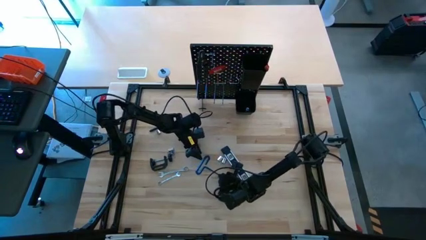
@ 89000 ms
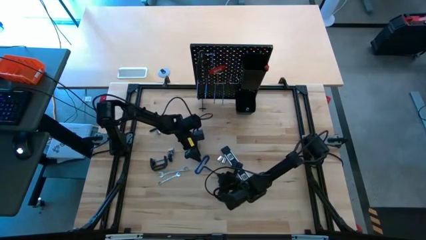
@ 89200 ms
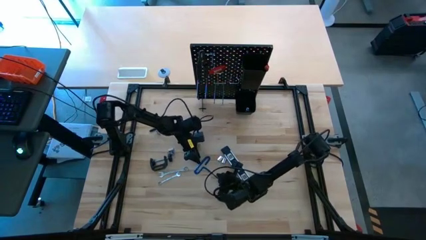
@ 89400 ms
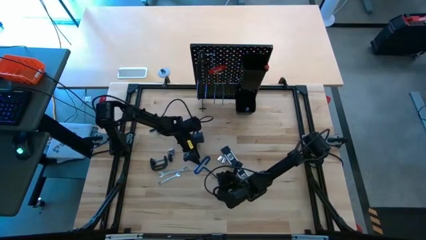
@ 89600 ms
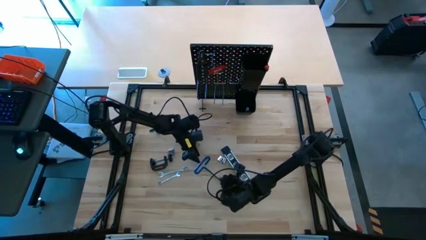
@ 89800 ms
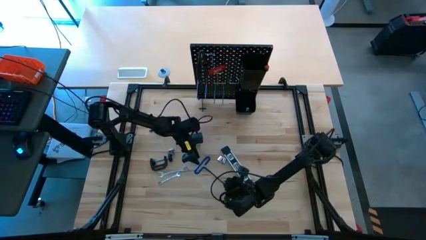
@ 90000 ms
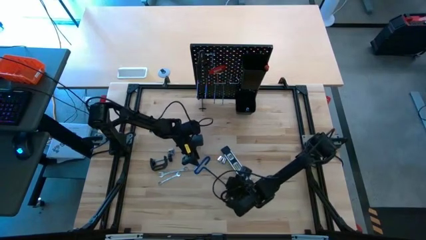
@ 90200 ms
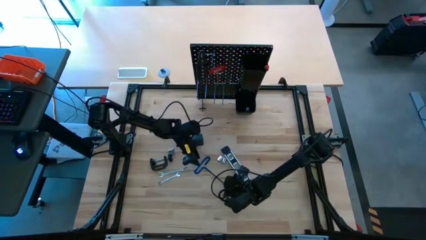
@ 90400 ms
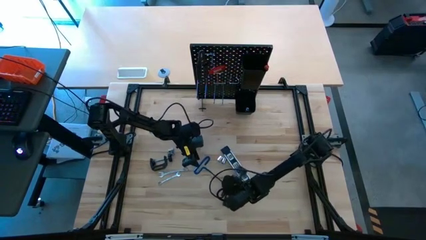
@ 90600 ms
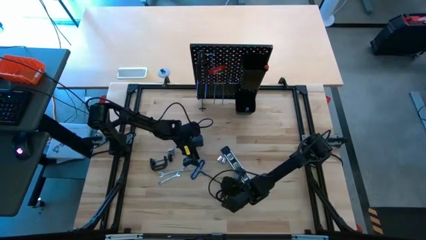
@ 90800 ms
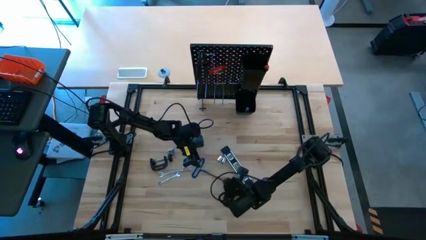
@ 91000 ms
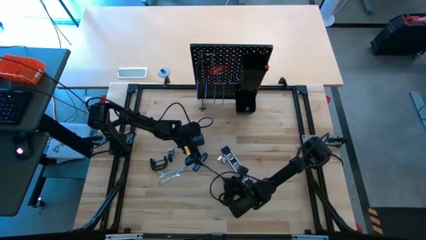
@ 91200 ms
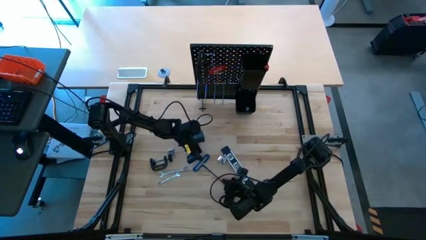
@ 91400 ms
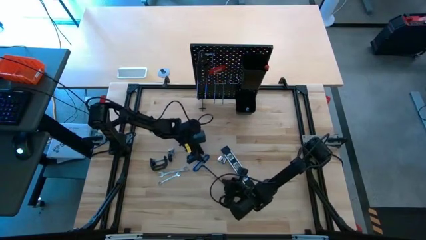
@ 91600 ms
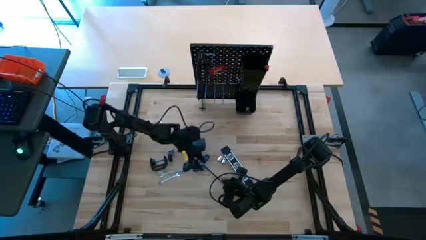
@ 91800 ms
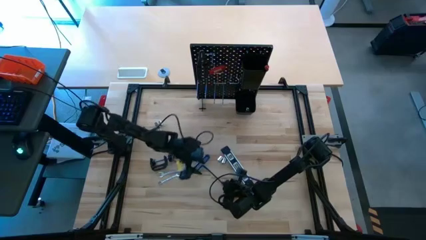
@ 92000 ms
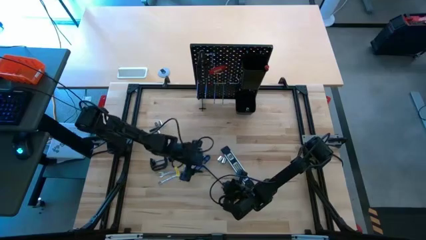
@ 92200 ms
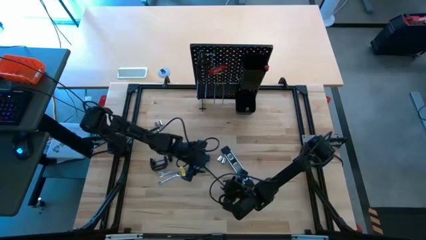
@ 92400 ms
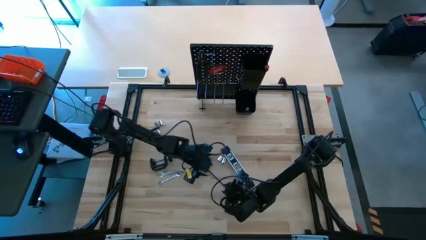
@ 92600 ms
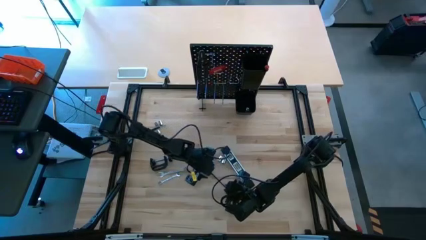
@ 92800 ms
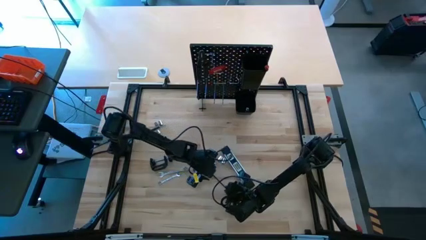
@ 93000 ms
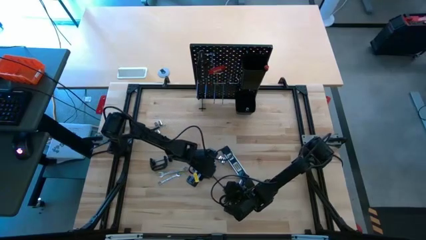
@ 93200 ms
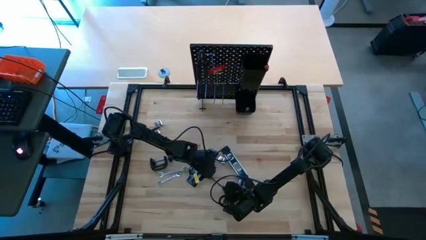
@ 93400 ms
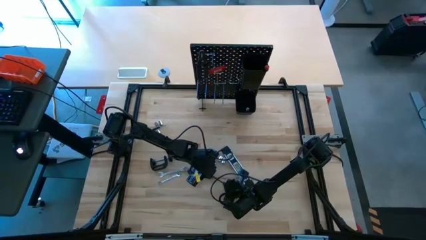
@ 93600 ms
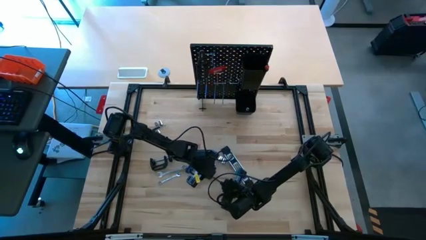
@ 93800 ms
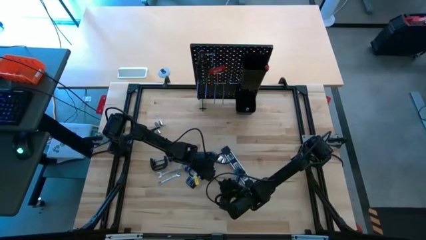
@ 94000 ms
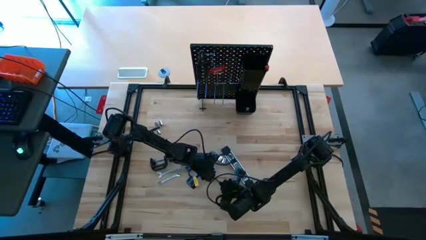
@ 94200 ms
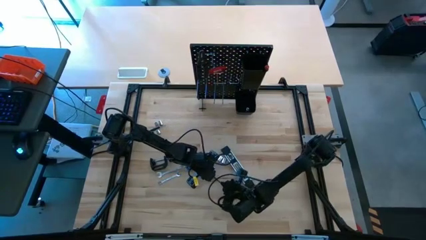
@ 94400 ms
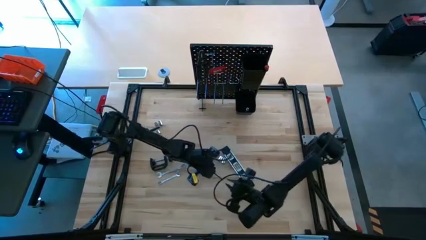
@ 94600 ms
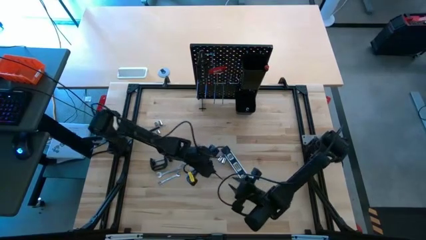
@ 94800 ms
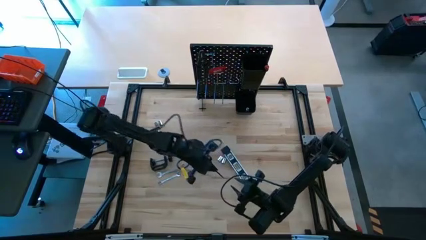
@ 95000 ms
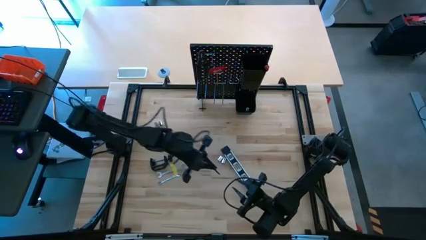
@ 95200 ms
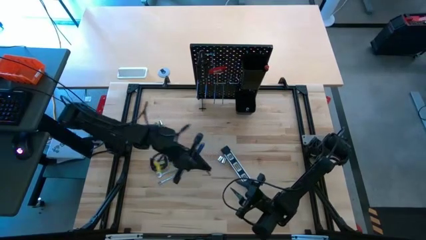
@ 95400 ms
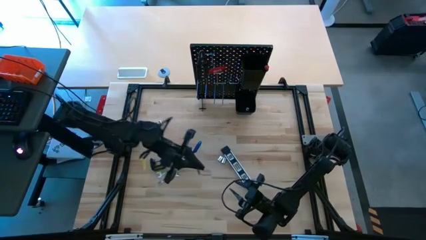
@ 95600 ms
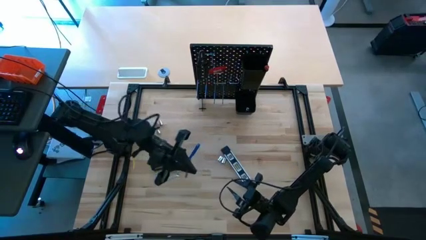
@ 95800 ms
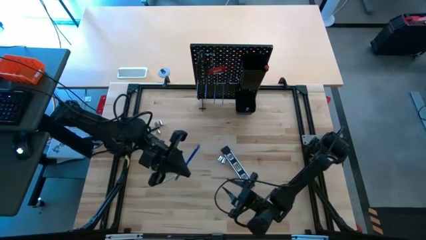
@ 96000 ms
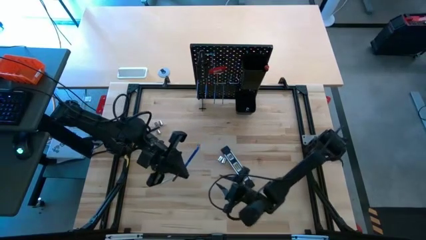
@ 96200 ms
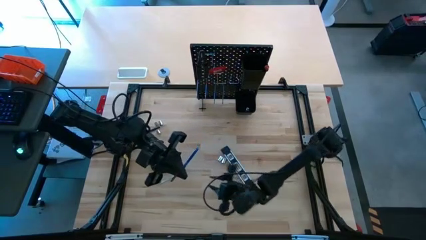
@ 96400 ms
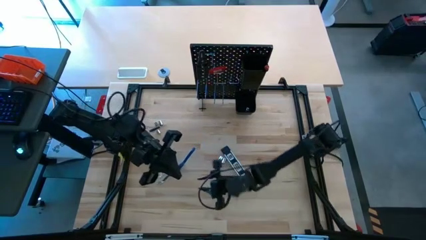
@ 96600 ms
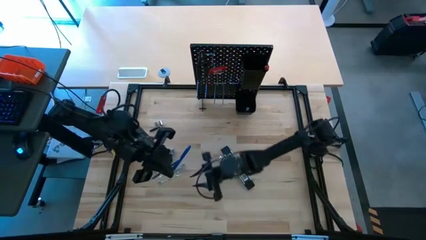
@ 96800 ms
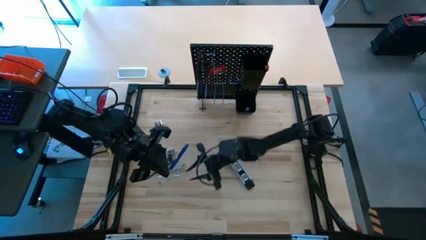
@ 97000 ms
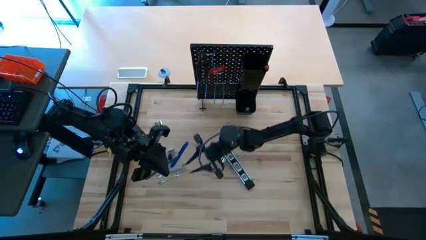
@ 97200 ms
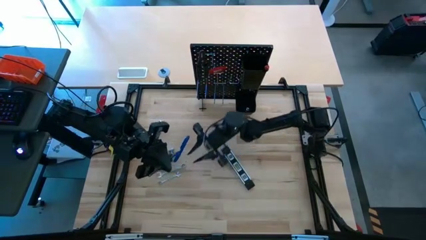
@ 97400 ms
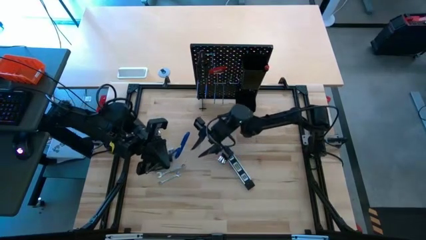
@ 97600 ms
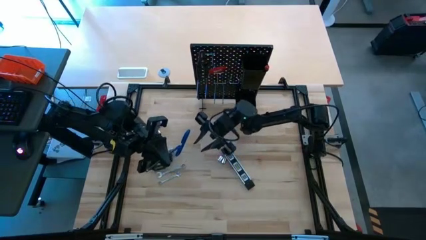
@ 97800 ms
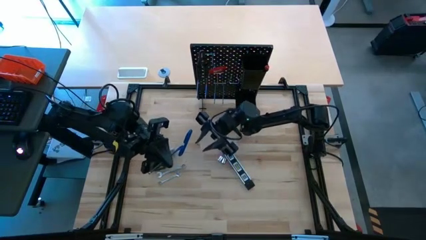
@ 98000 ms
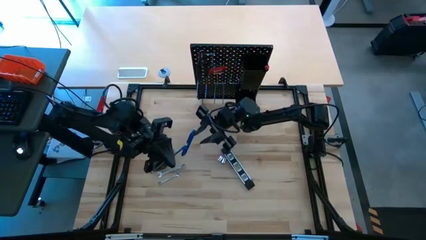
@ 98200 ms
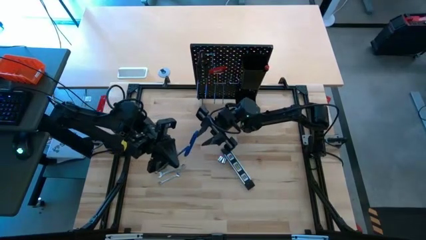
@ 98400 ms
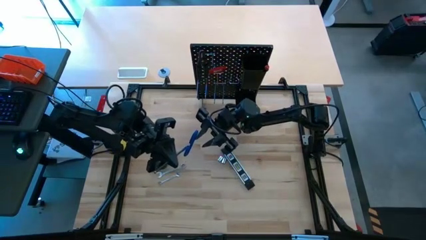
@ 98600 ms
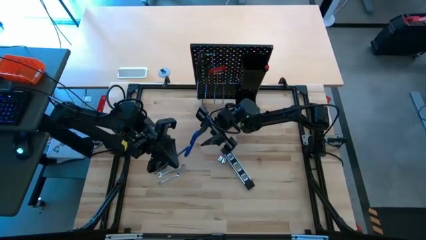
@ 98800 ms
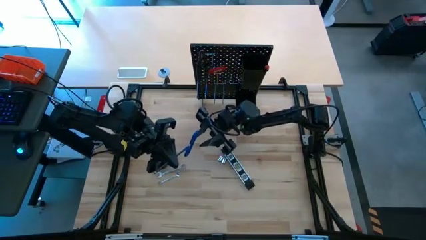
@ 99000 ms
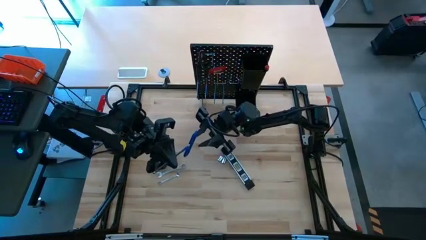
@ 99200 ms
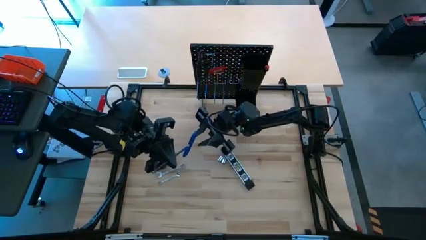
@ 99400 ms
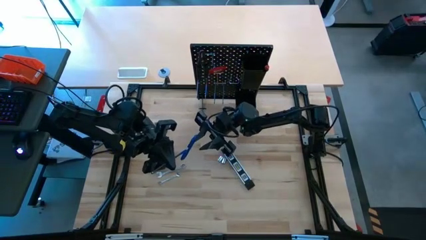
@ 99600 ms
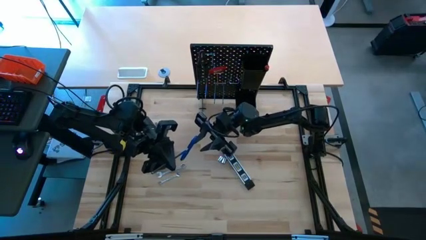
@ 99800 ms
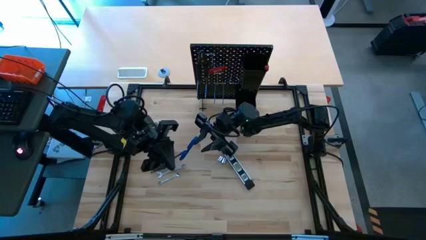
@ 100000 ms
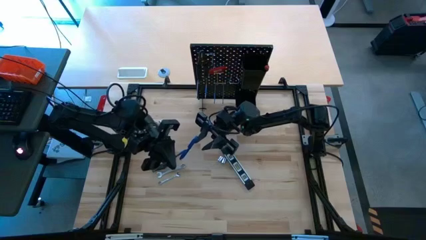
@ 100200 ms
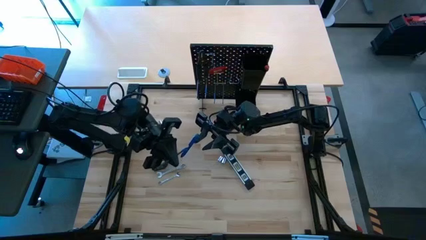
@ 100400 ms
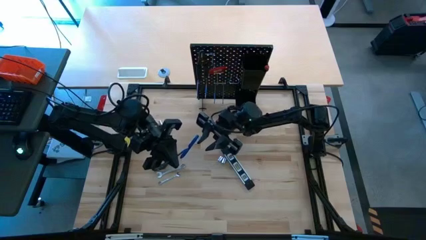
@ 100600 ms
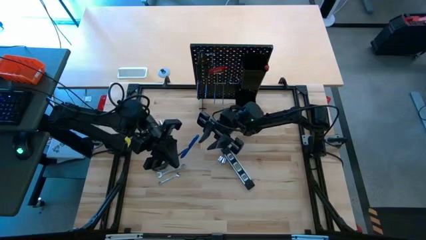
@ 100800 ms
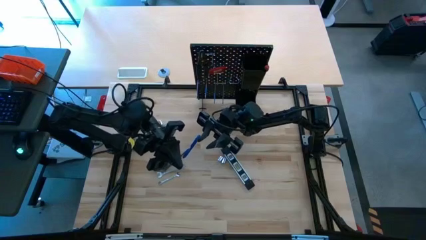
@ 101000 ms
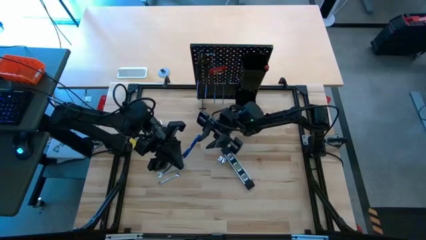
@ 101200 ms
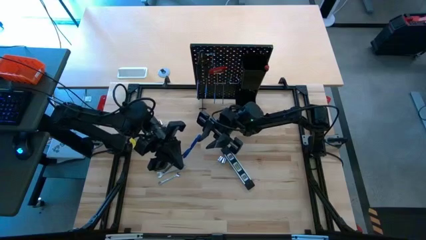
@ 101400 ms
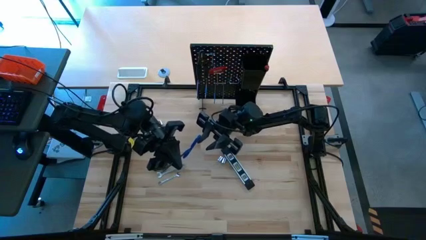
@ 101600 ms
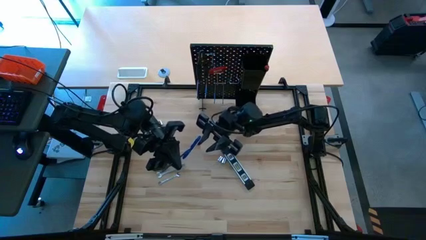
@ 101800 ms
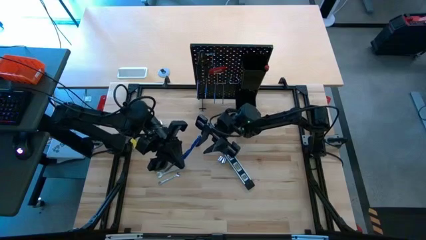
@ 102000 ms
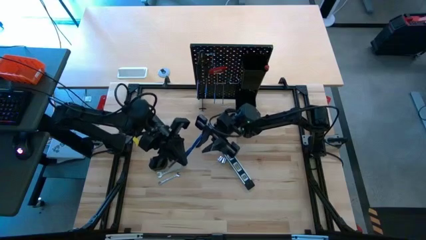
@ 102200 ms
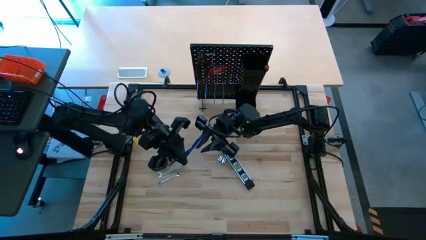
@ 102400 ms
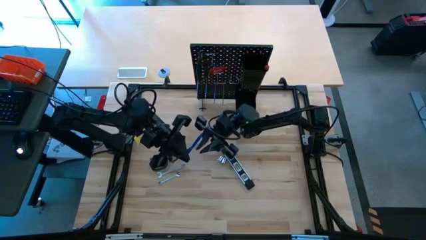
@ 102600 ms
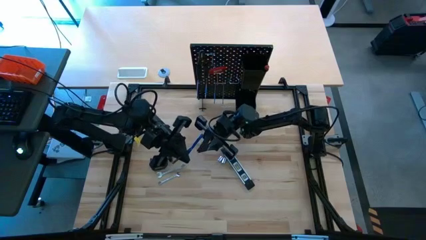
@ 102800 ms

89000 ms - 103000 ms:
Task: Hang tools onto peg board
Put the pick tool into the top black bin on the peg board
